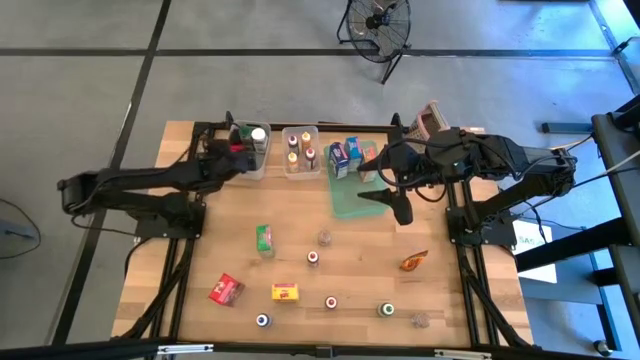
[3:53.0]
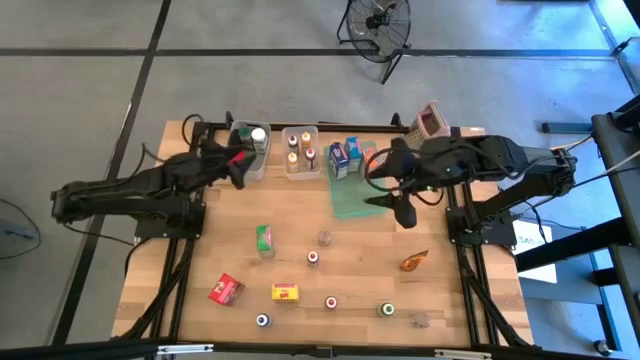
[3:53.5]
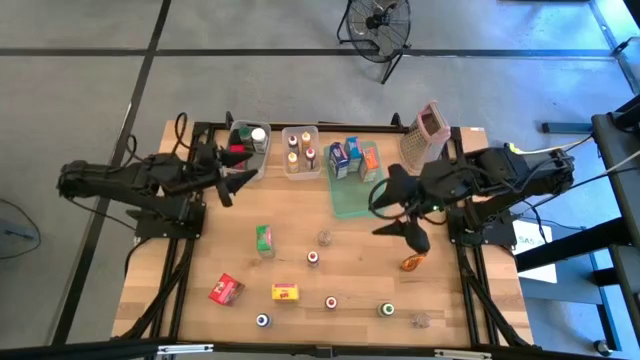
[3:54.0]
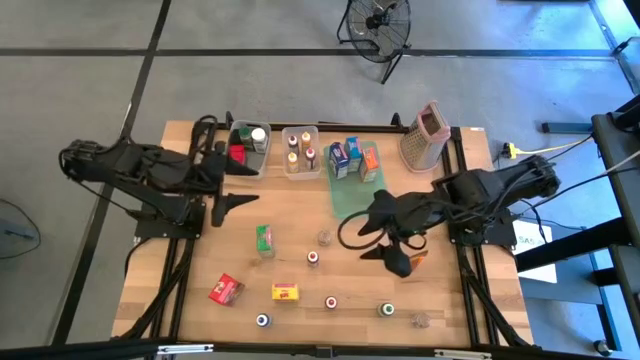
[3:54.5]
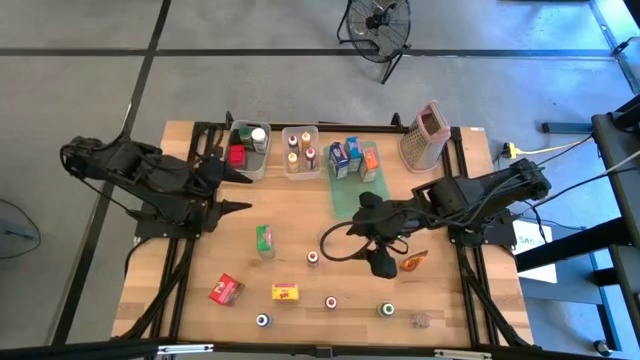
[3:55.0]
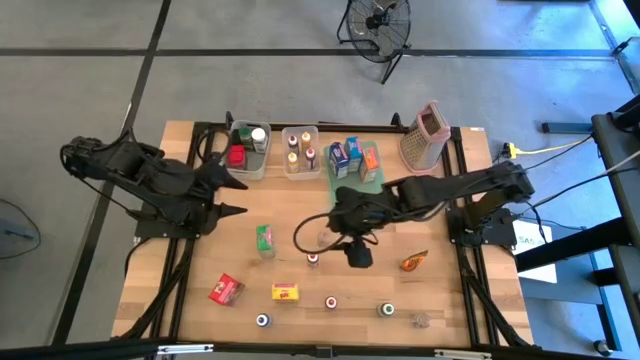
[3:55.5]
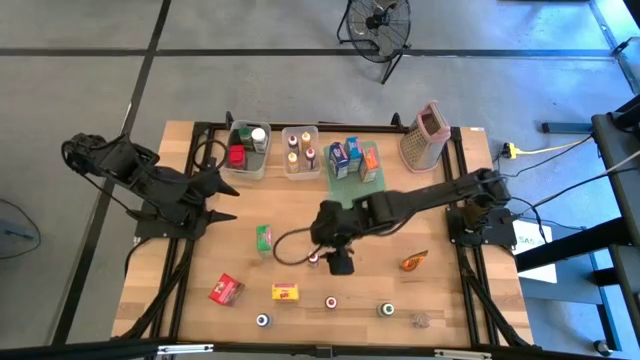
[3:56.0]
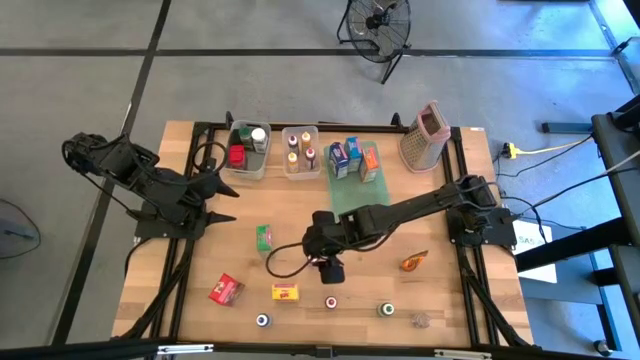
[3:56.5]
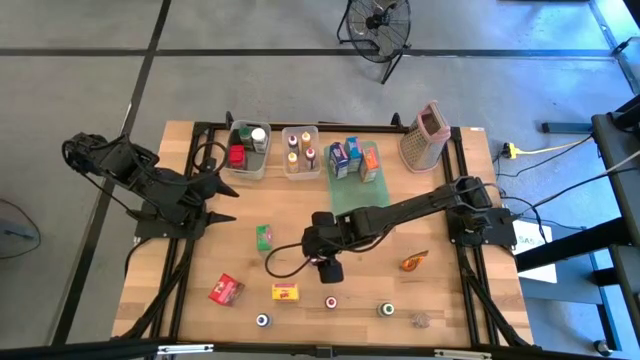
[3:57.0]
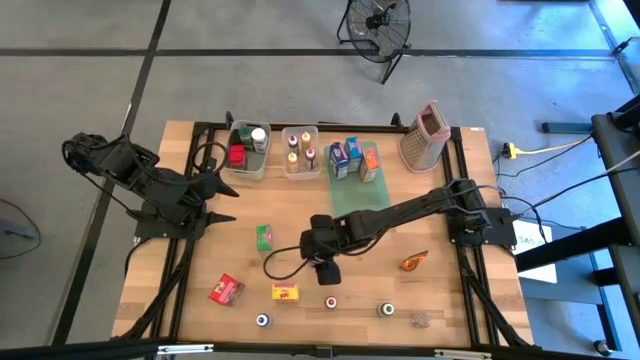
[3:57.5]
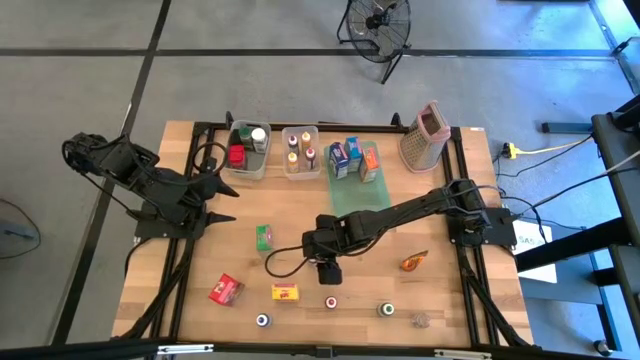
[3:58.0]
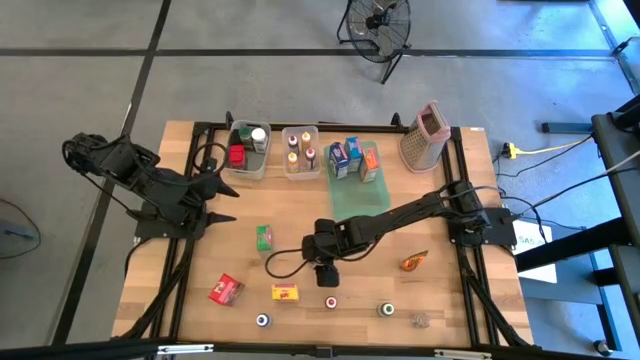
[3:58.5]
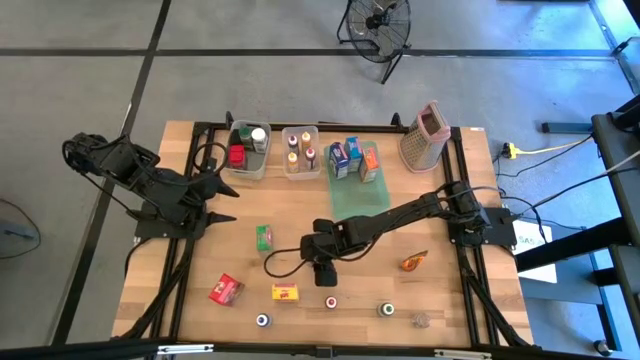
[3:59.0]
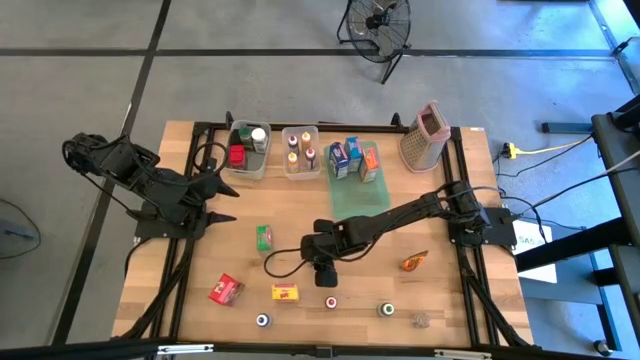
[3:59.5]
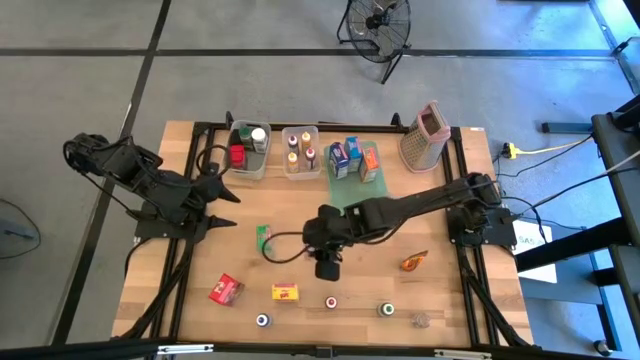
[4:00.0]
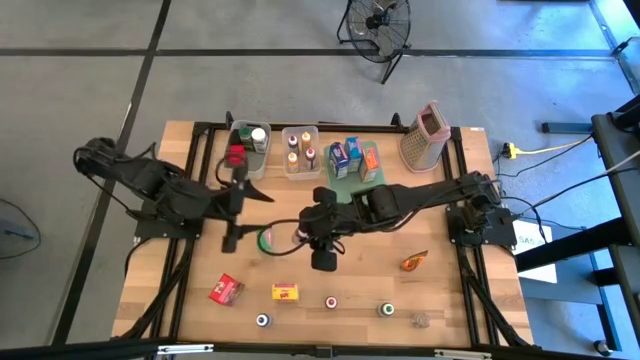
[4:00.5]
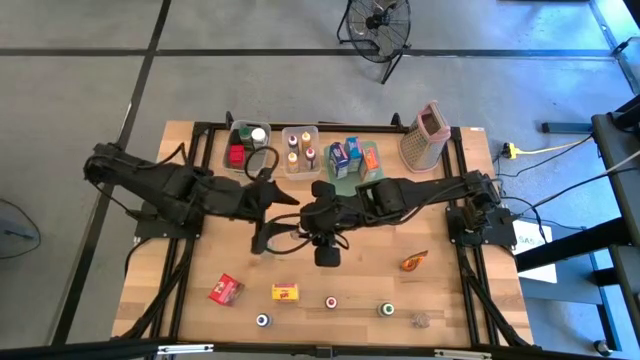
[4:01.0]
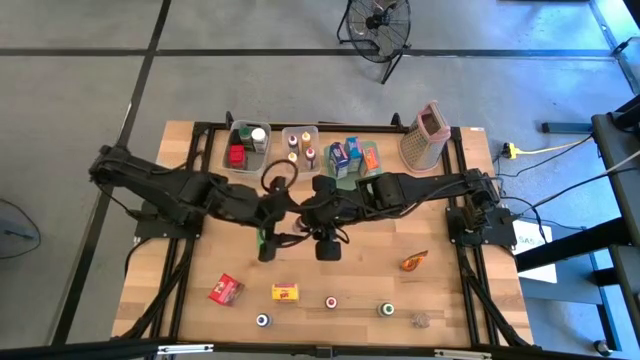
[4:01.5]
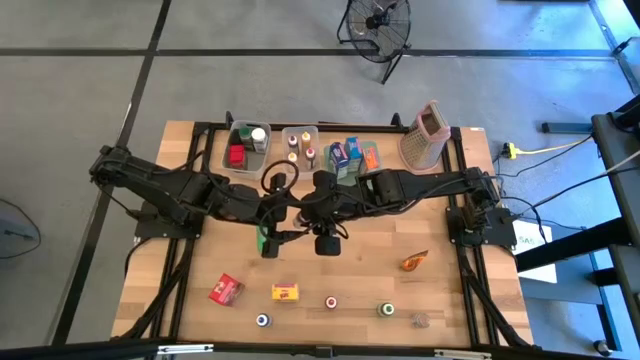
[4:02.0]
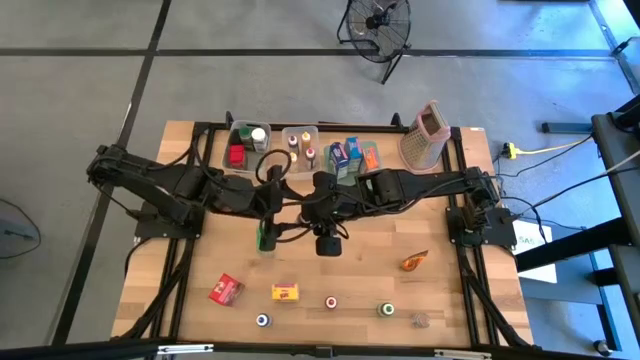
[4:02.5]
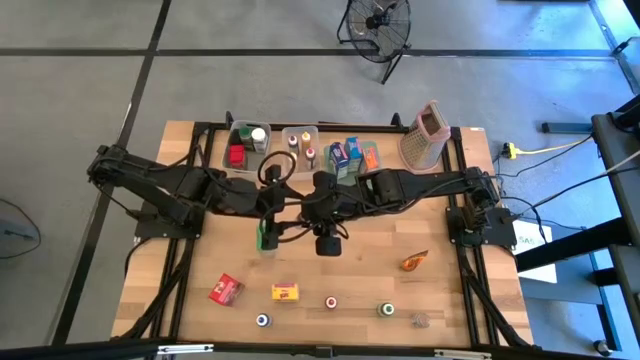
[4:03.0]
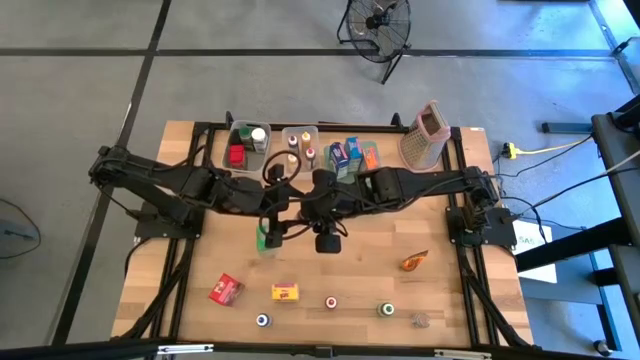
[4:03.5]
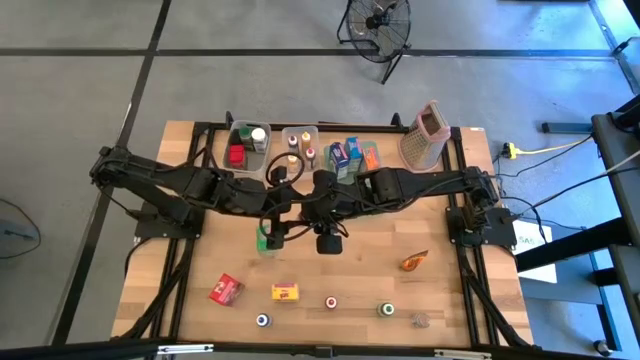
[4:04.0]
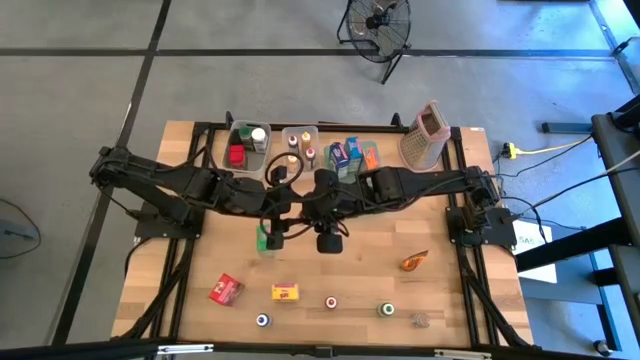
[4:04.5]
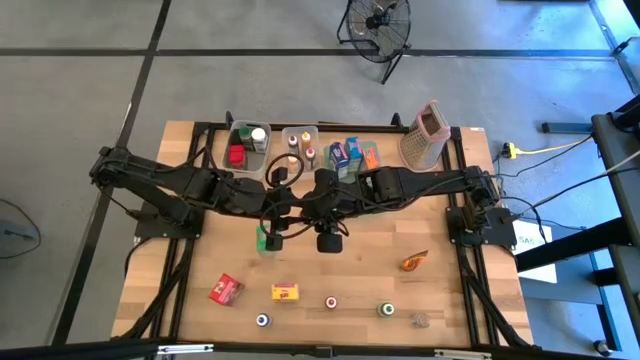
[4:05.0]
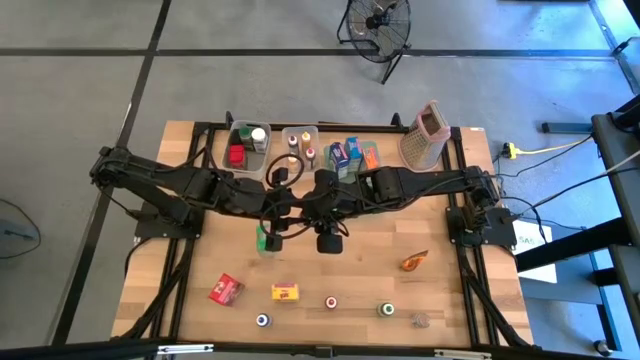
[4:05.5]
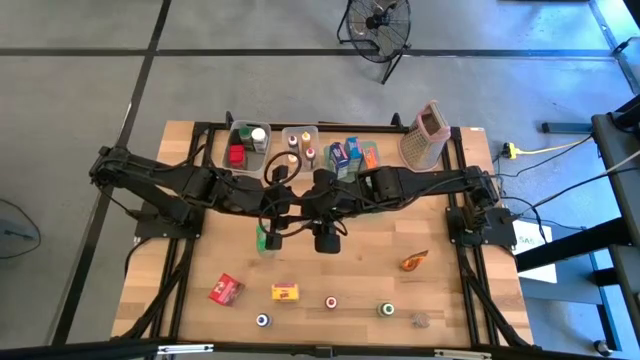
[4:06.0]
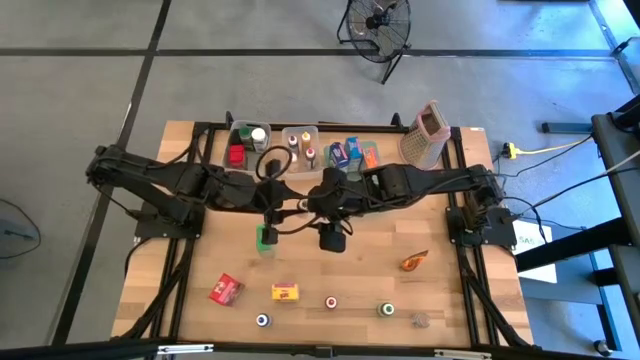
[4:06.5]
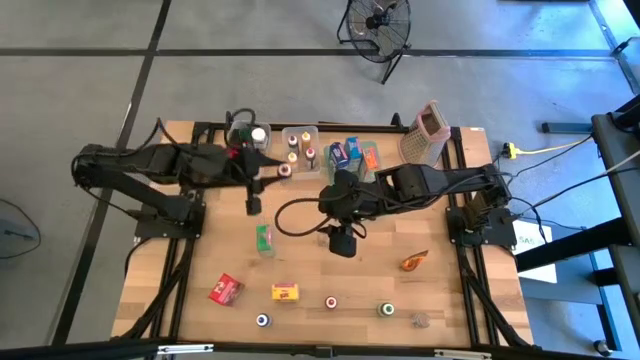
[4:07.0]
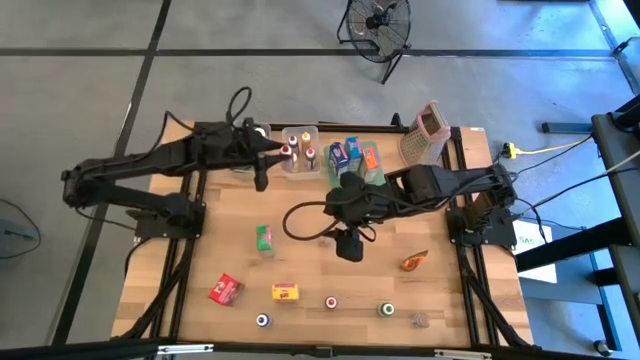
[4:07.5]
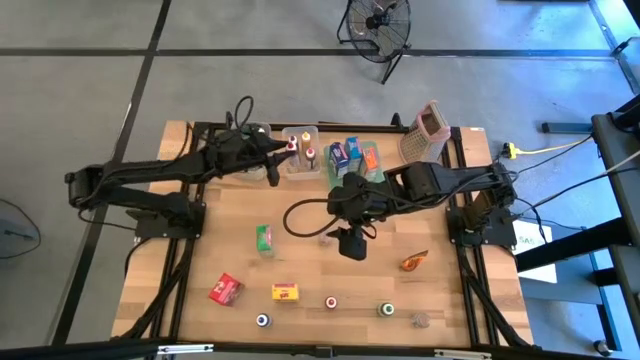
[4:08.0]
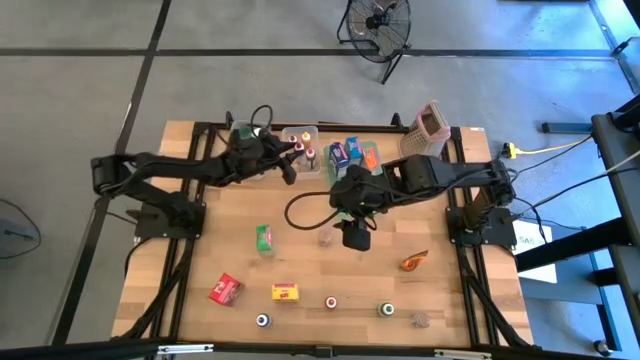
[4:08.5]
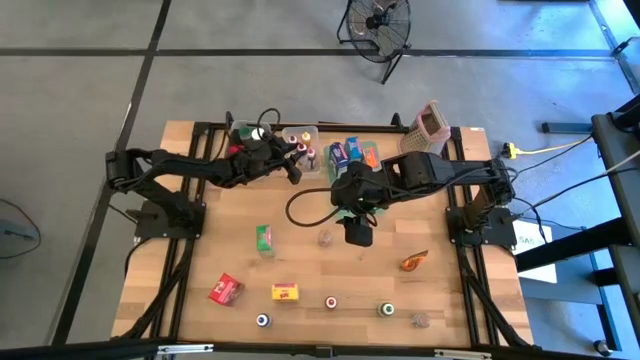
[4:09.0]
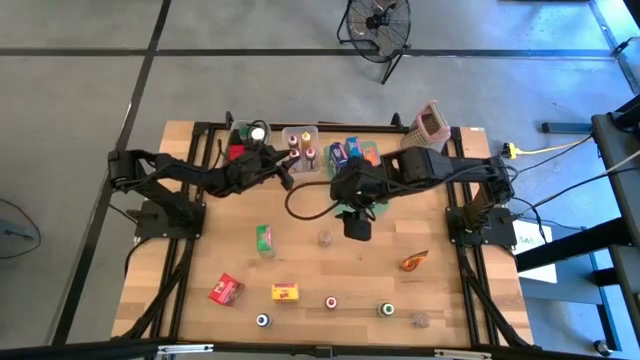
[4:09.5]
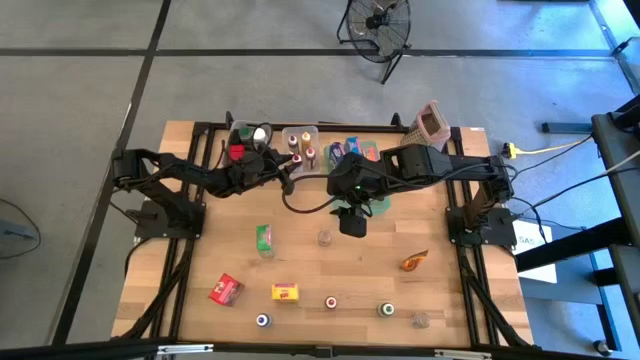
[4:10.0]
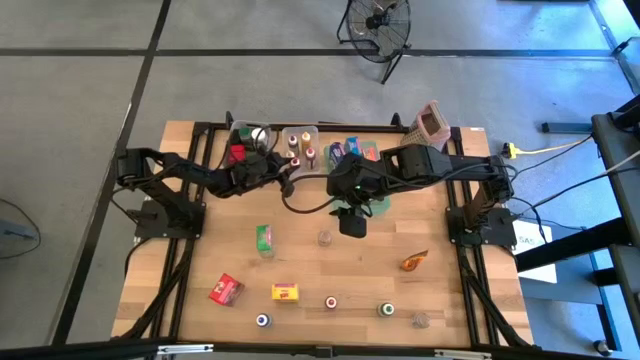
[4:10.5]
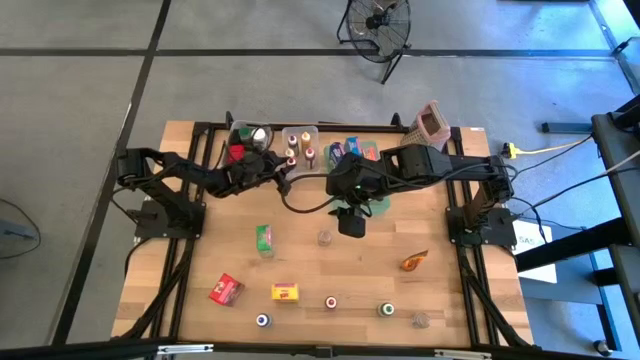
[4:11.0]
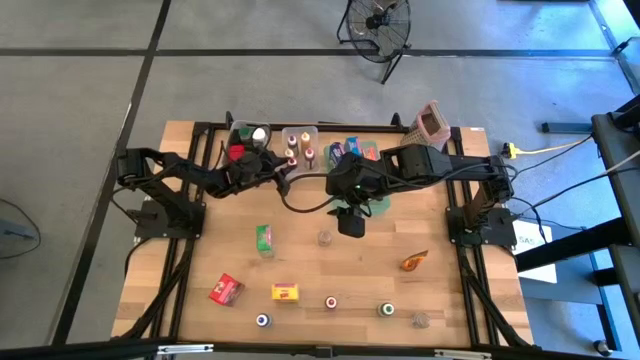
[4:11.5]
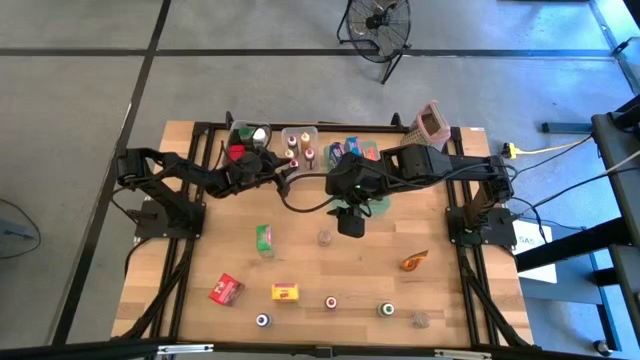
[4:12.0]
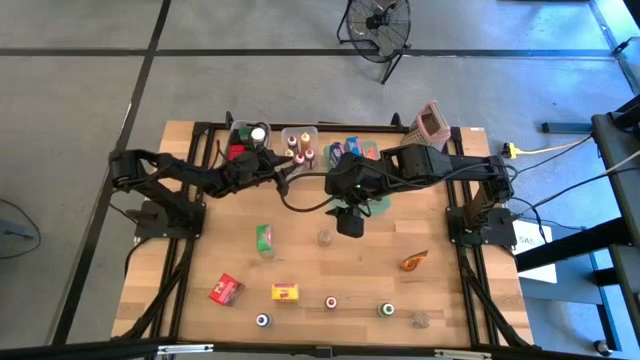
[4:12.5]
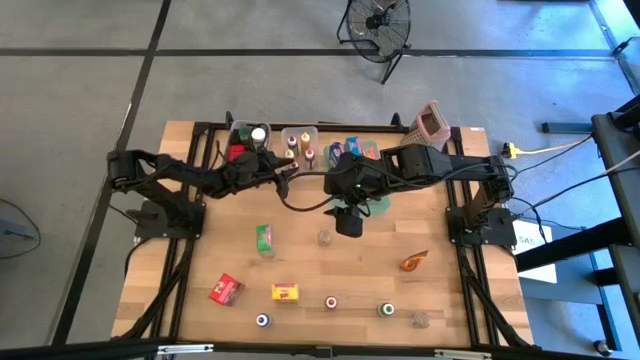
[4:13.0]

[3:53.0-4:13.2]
Task: Pick & Place Kitchen Items
Put the top red food coloring bottle into the transparent bin

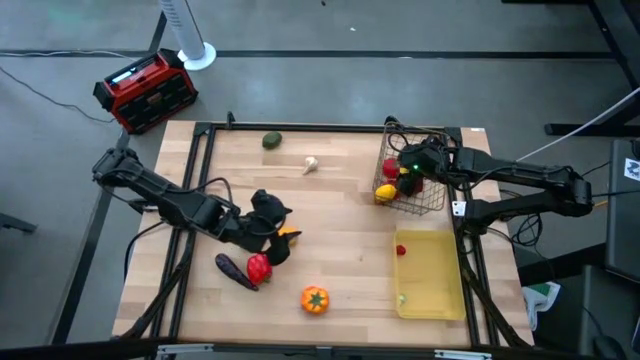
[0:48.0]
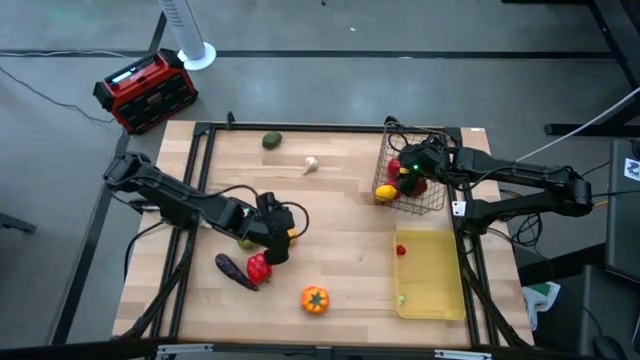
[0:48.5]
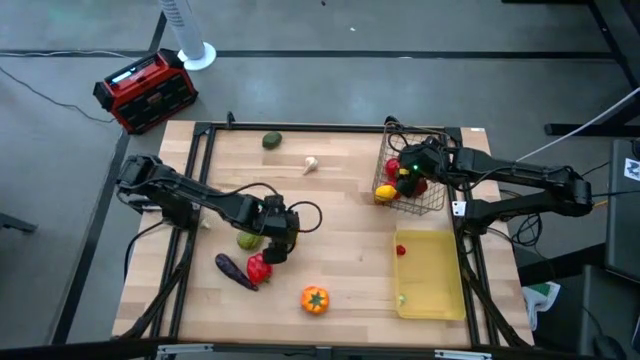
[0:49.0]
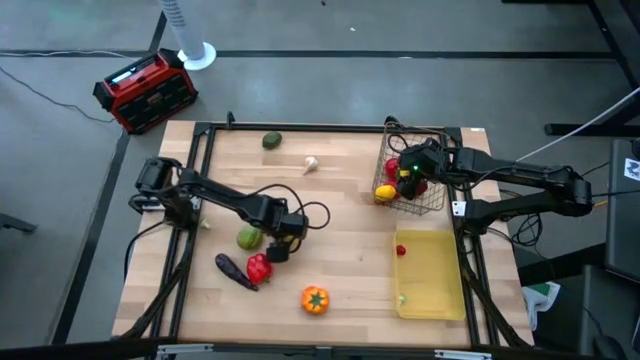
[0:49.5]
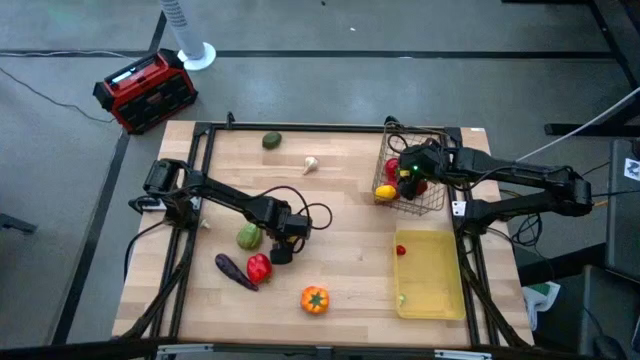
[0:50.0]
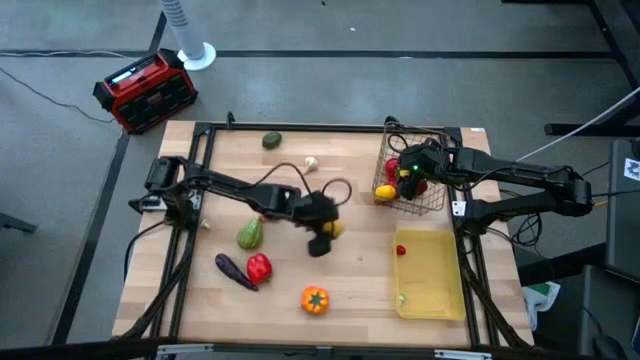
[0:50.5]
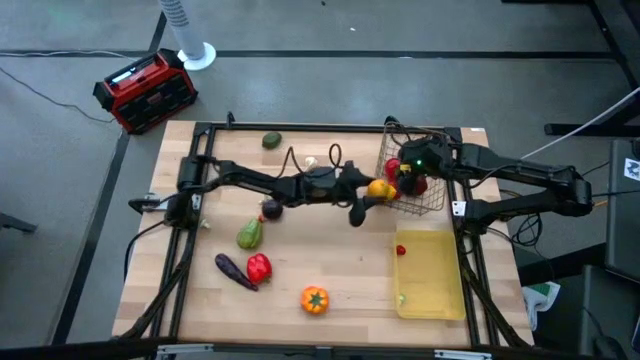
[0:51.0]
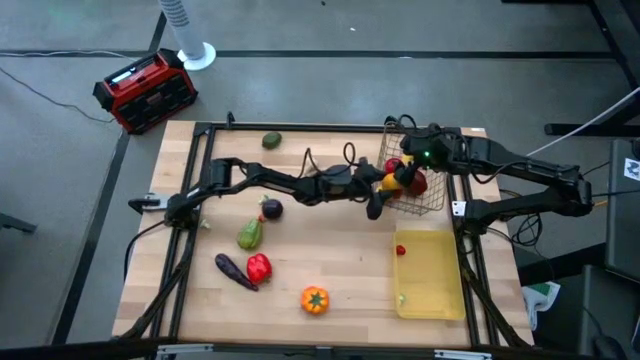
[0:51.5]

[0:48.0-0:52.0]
Task: Sort produce into baskets
Put the yellow lemon into the wired basket
